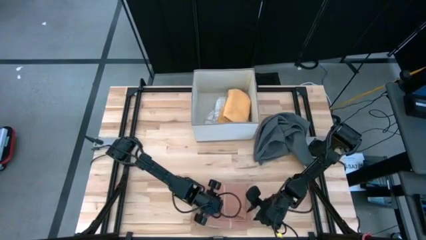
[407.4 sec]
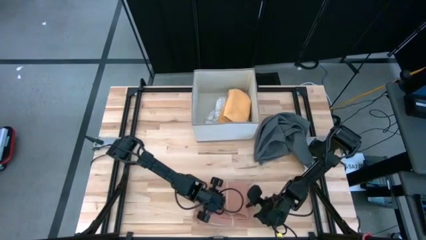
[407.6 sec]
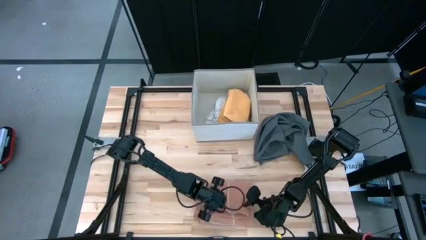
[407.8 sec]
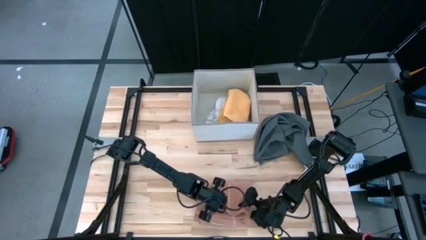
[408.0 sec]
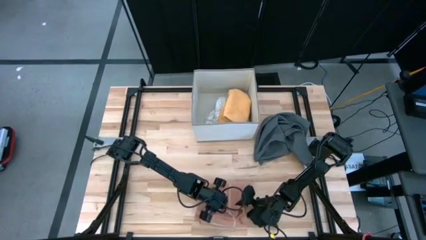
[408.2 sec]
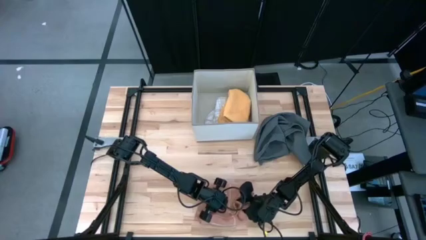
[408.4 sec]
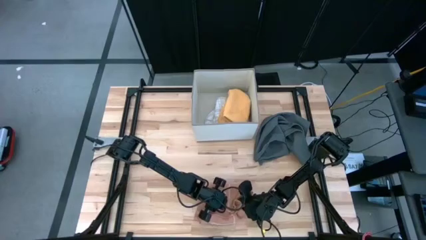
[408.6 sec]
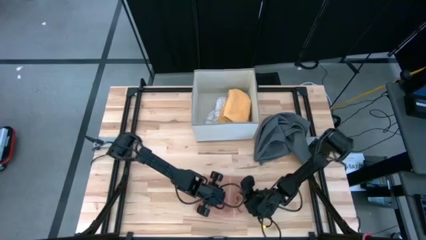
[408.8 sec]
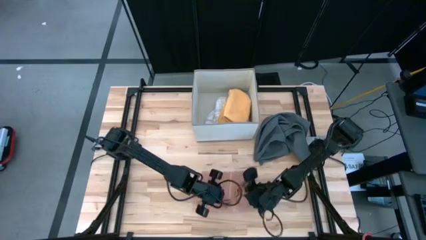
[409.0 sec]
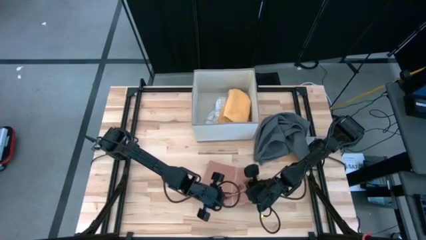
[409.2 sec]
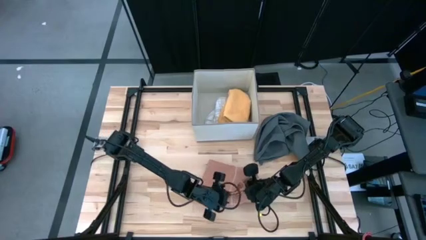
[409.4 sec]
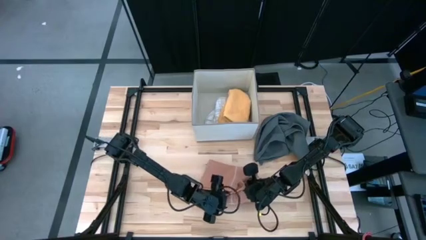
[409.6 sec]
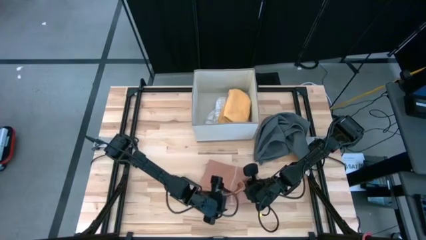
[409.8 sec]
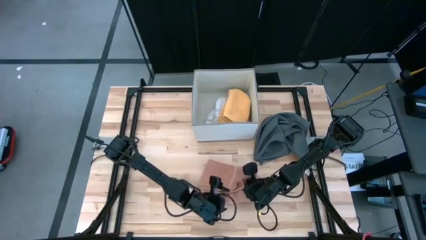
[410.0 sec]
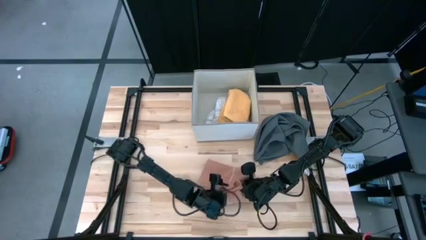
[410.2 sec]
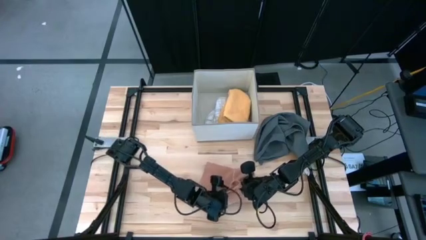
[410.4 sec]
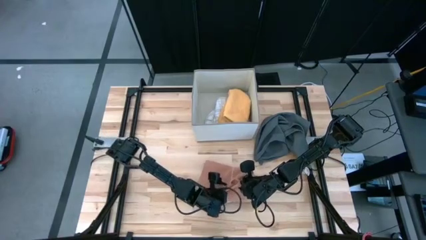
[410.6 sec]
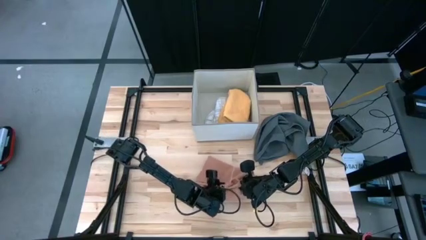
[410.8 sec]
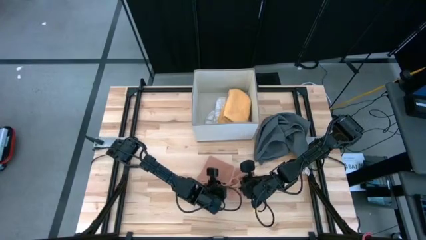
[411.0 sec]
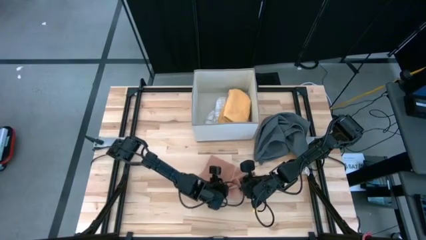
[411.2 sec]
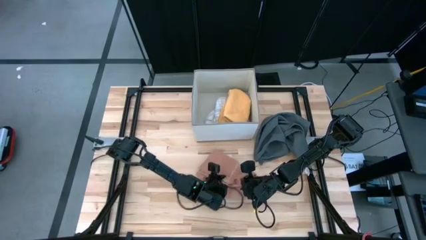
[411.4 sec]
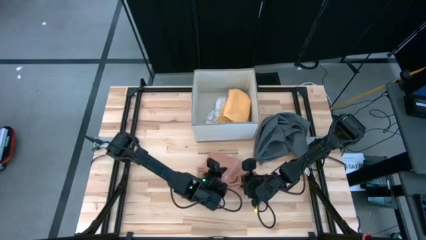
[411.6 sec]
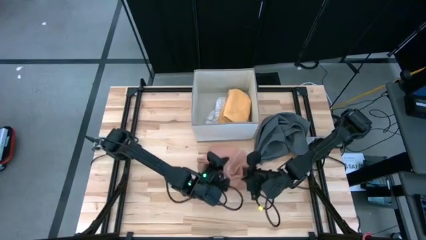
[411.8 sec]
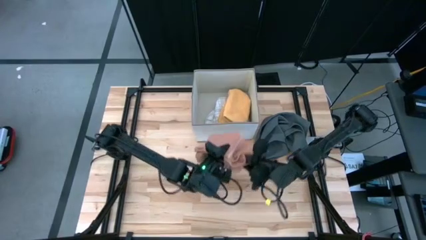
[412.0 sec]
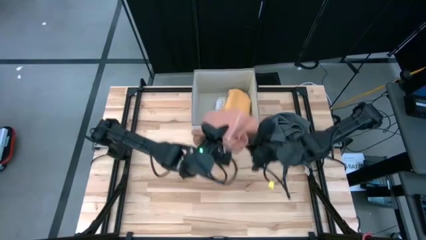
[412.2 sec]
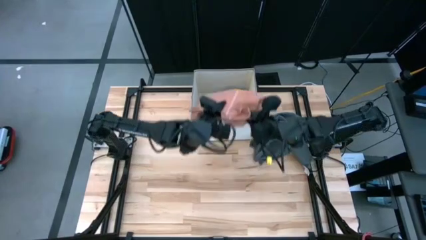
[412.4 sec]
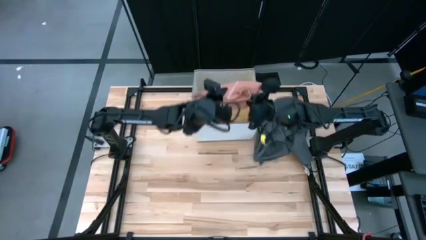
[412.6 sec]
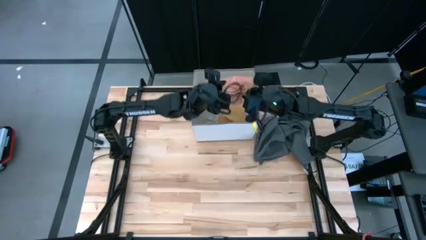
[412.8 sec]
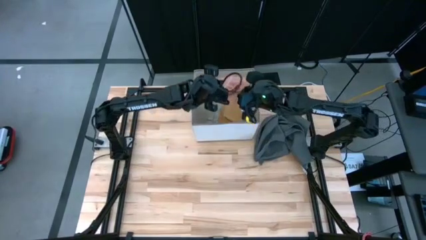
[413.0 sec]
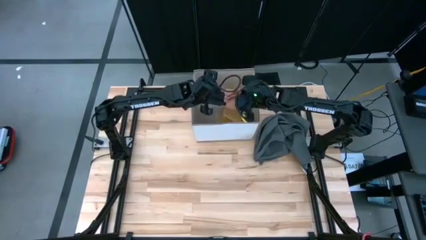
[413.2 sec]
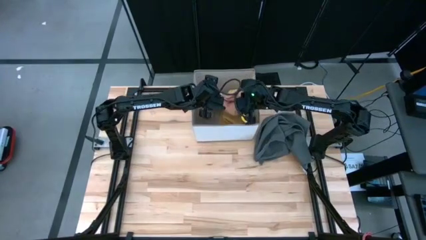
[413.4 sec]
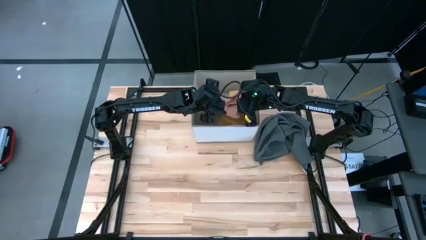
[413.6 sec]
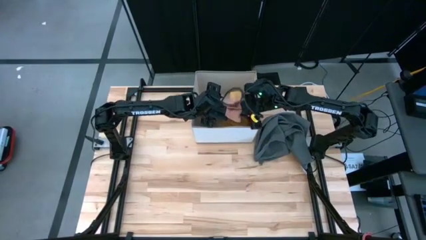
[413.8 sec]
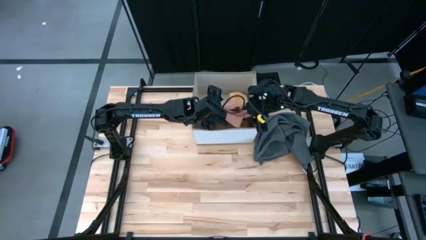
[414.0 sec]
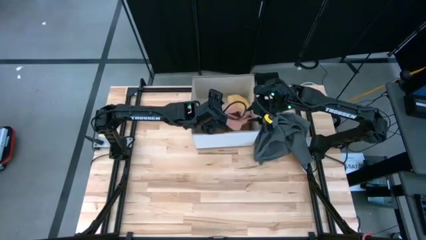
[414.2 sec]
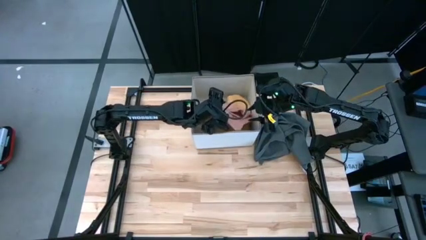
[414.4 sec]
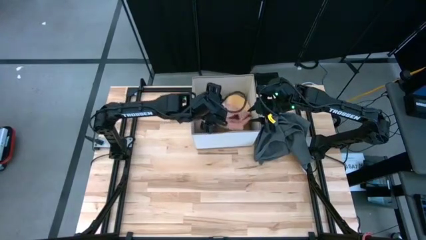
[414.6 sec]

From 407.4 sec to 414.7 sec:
Task: Fold towel
Put the folded light orange towel into the laundry organizer
